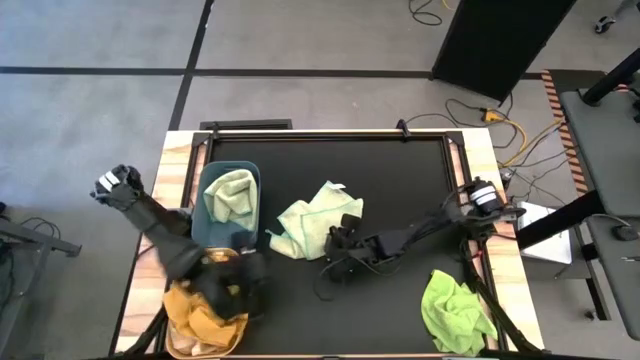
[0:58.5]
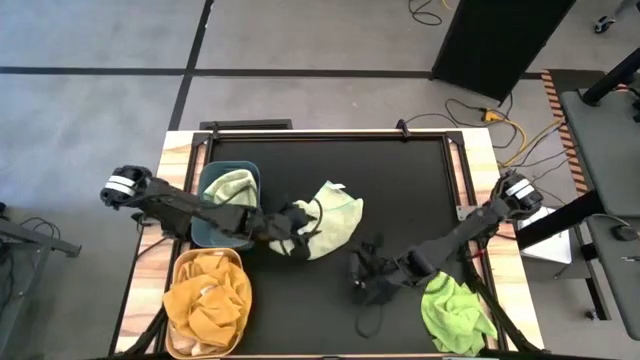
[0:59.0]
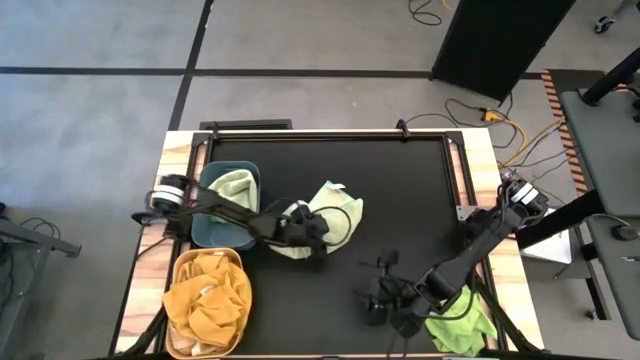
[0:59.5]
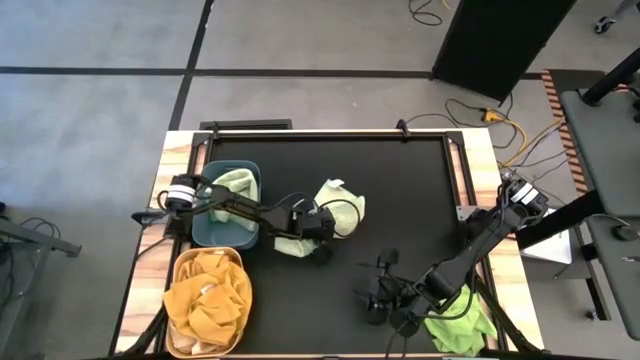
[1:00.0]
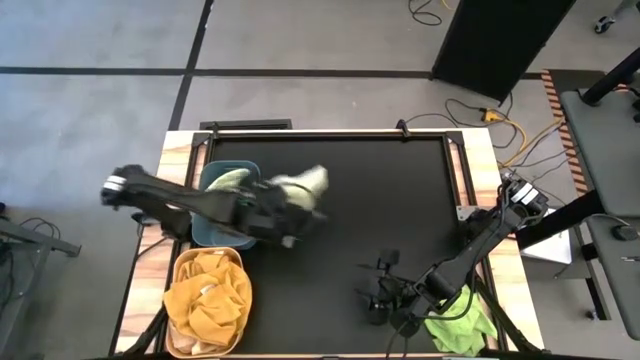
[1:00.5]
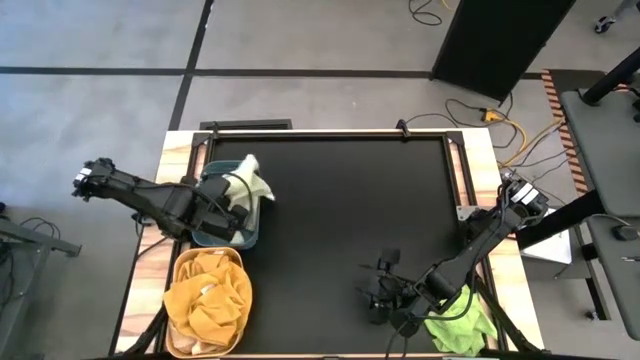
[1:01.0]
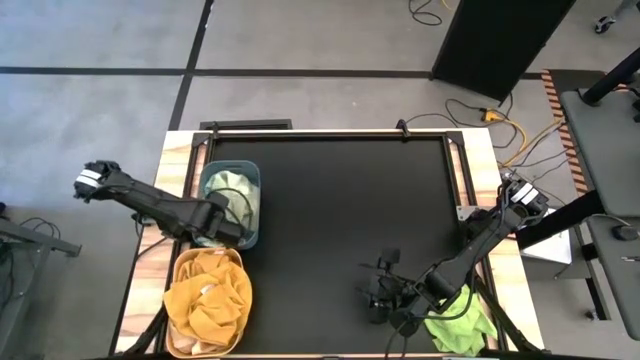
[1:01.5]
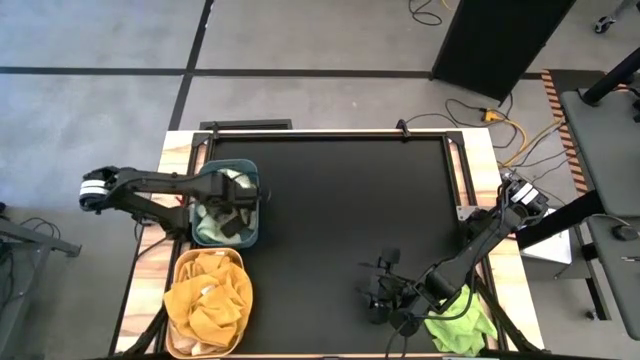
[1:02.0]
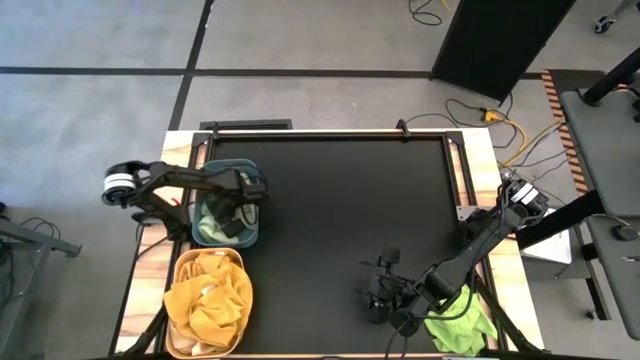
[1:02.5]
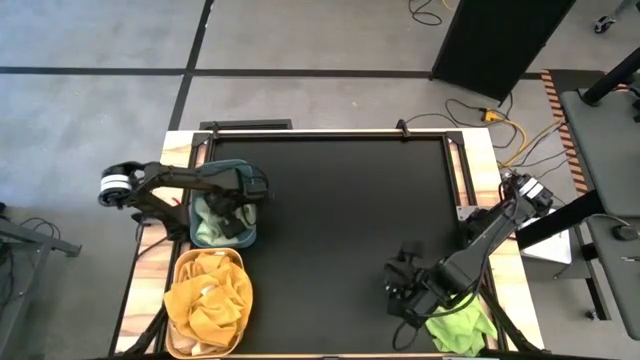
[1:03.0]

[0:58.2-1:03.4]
Task: Sort towels by color in basket
Put the light green microfiber towel into the blue bin

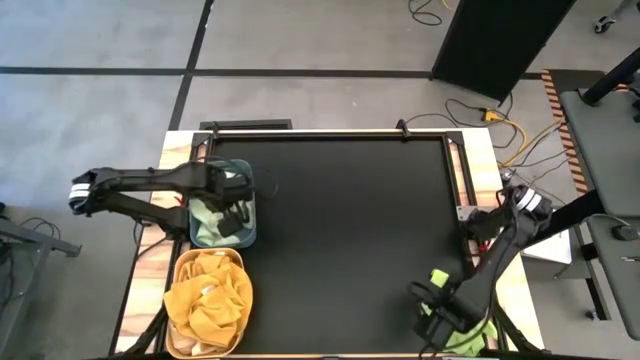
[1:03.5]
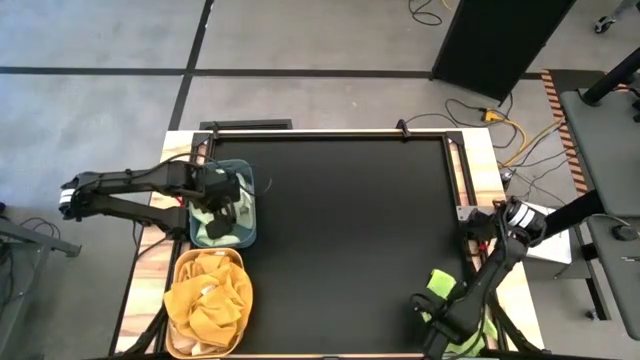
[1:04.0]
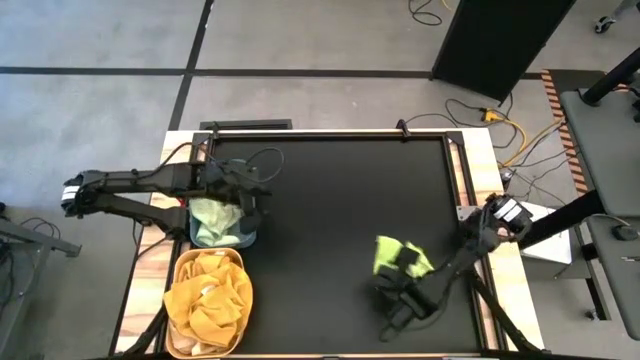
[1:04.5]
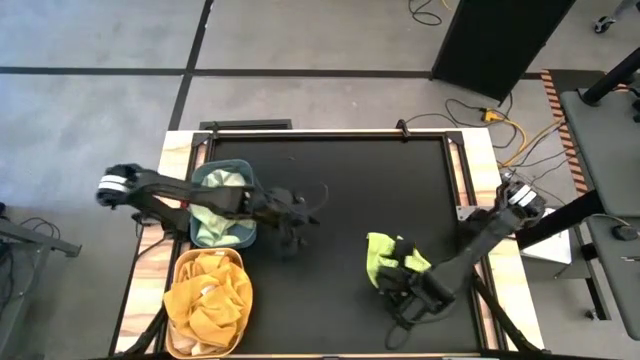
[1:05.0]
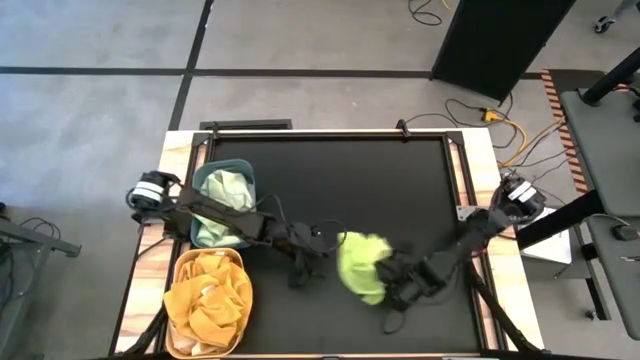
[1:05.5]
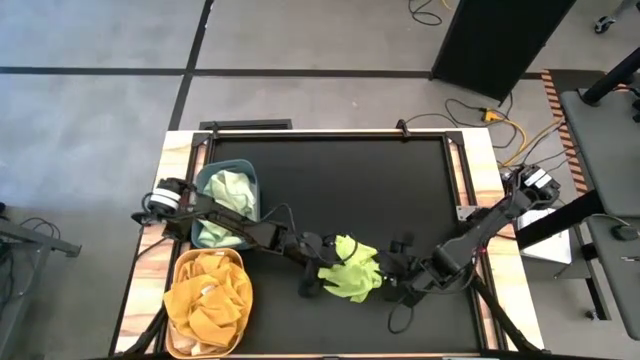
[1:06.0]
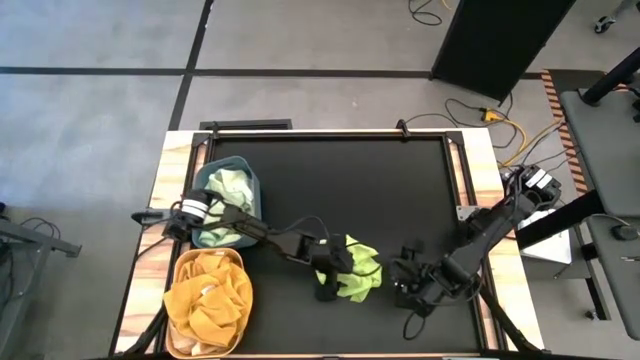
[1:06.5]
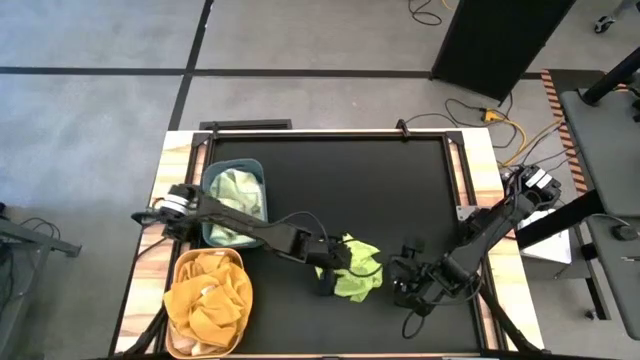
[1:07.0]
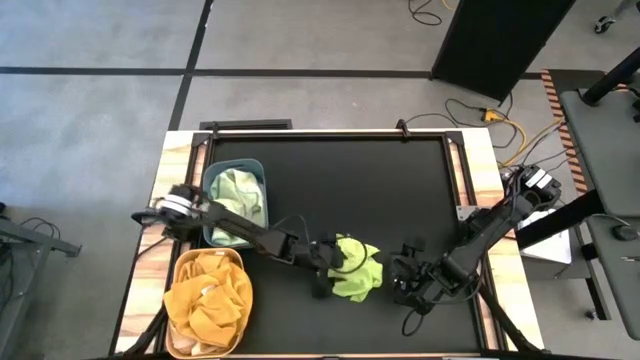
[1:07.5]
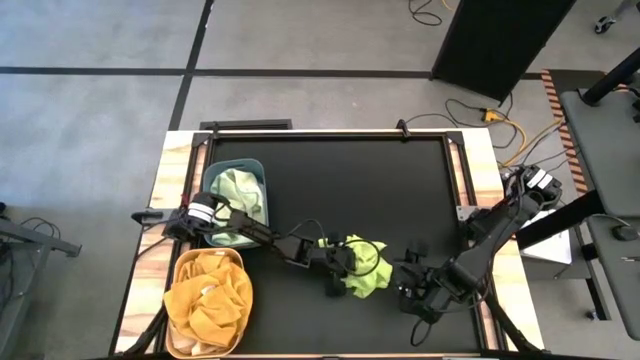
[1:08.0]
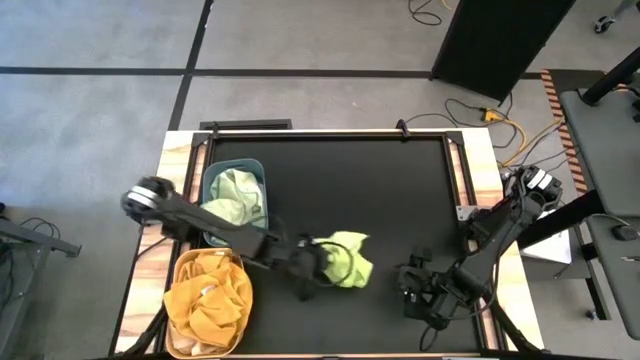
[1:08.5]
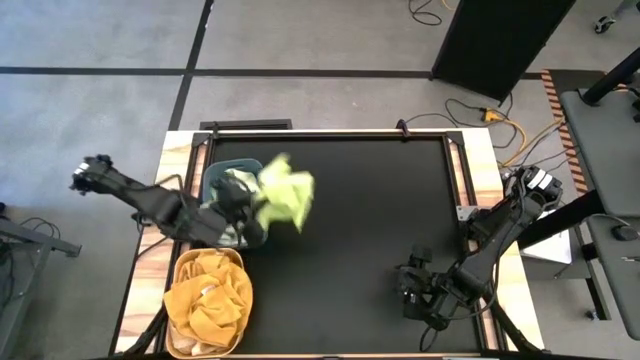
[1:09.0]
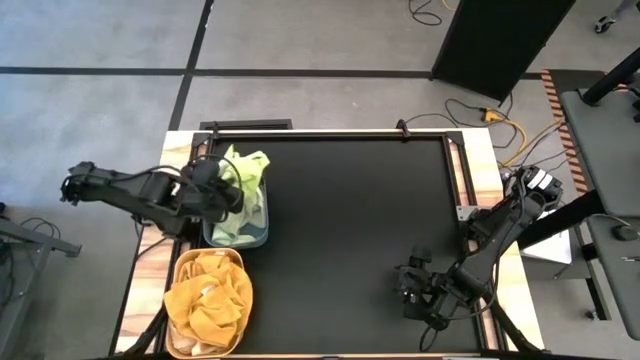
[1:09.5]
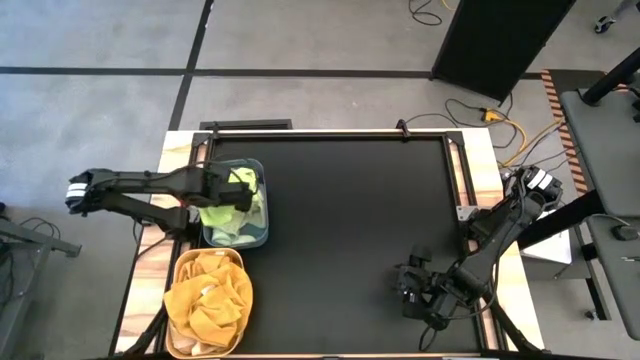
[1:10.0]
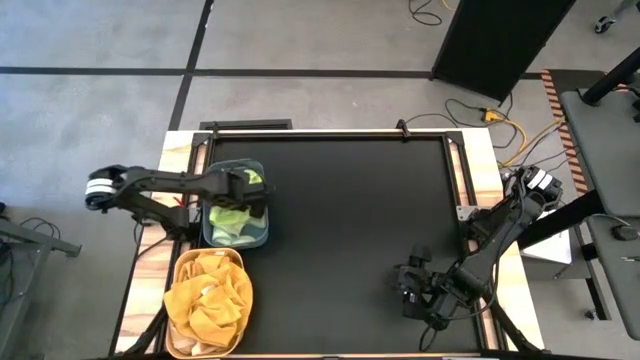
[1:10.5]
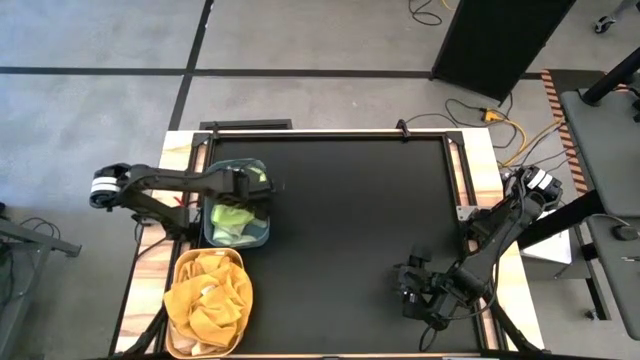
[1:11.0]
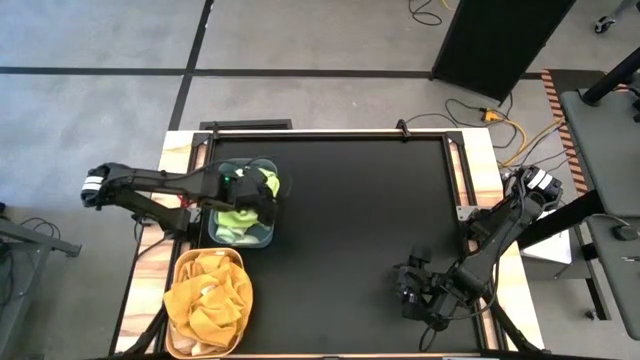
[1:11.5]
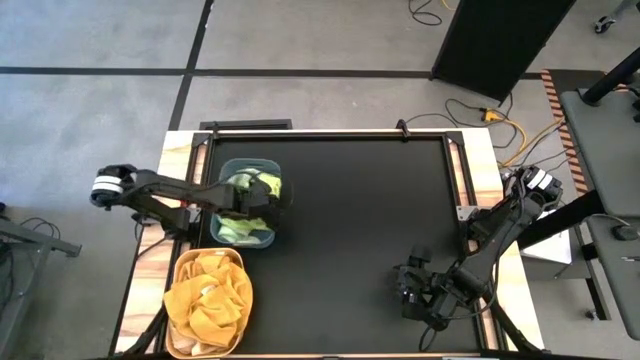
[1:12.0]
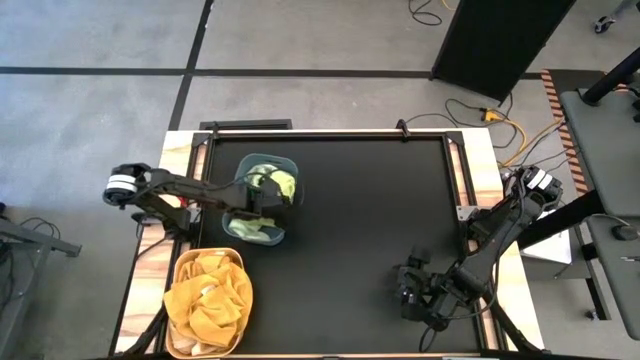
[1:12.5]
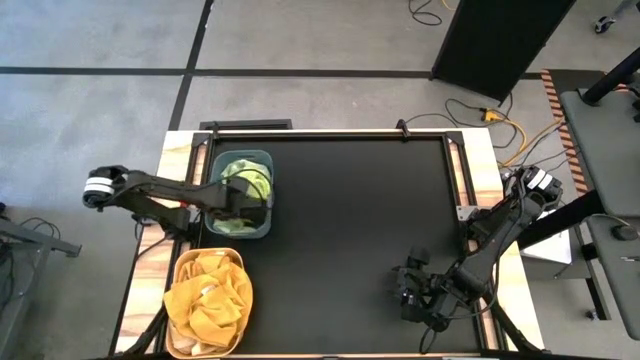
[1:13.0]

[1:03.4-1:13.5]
Put the green microfiber towel into the blue bin

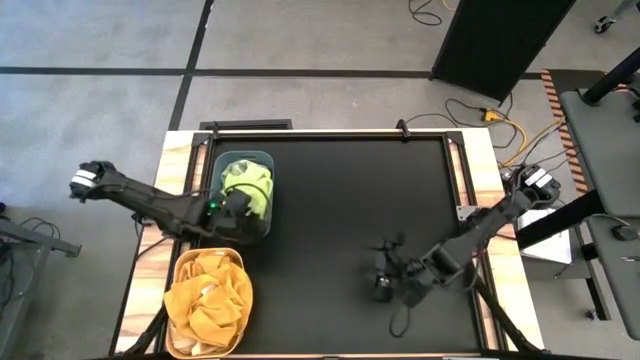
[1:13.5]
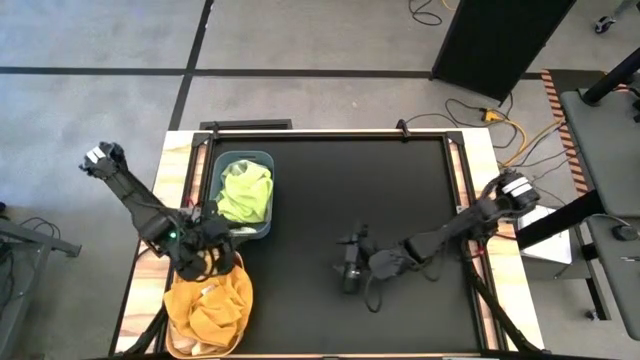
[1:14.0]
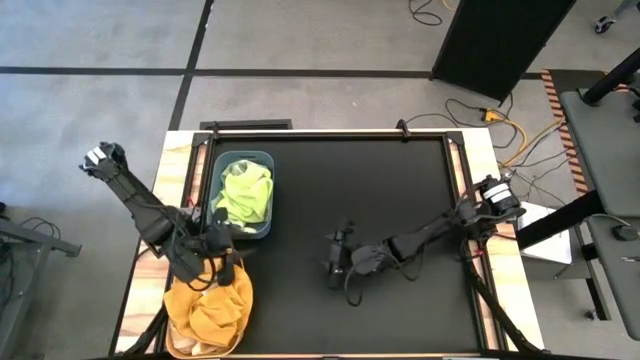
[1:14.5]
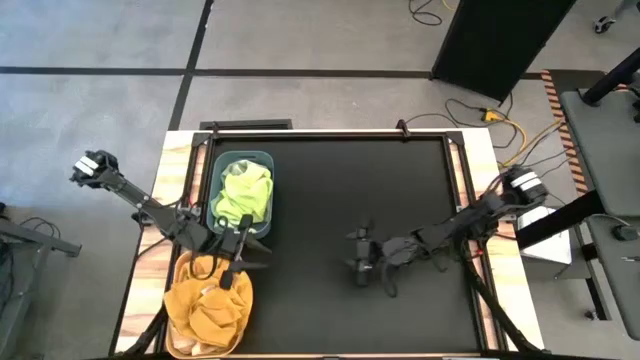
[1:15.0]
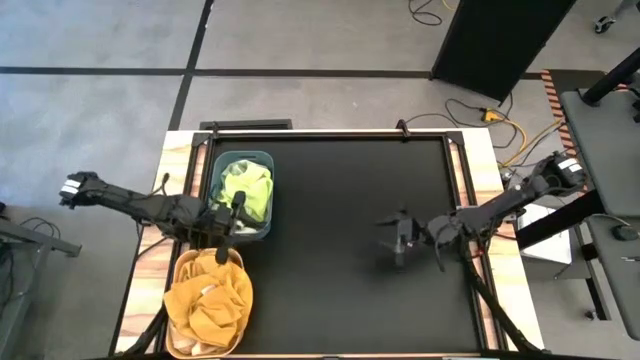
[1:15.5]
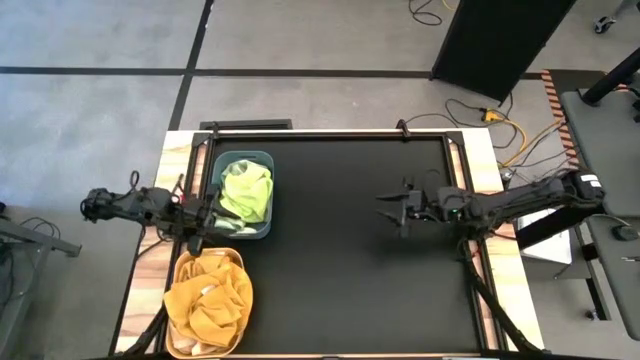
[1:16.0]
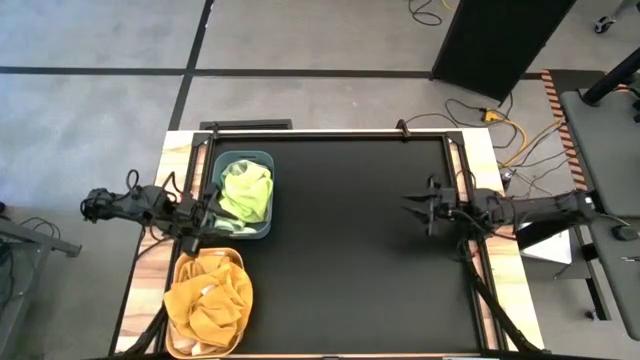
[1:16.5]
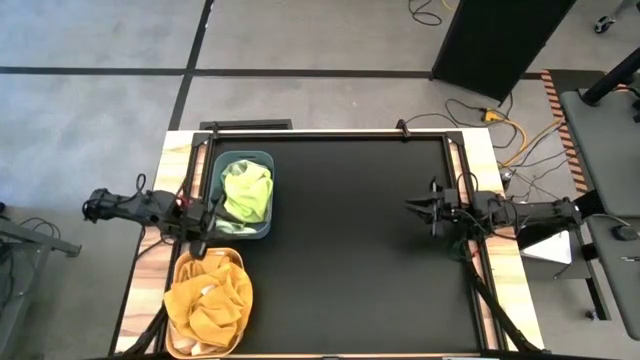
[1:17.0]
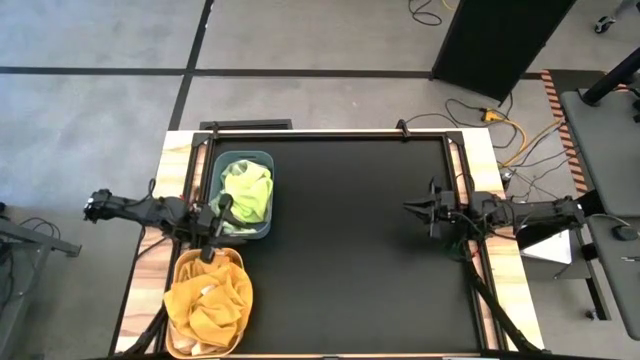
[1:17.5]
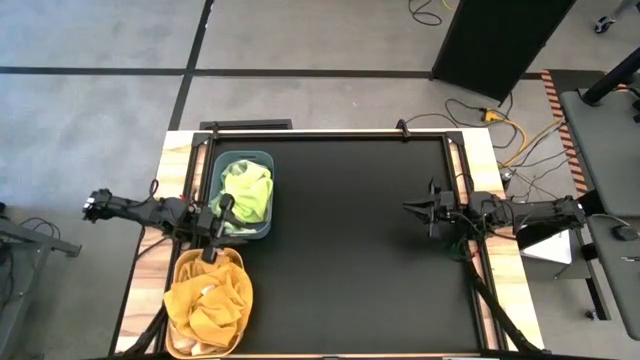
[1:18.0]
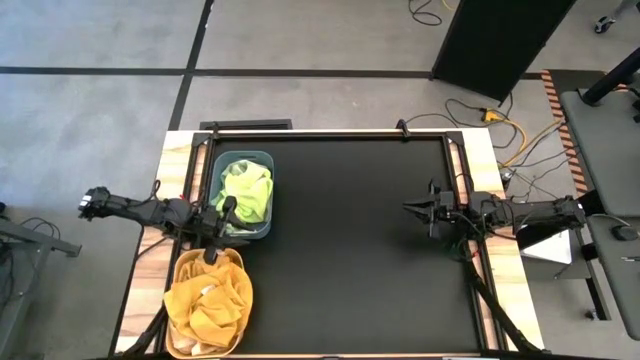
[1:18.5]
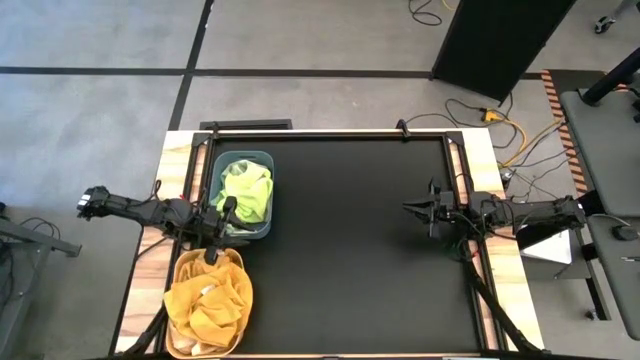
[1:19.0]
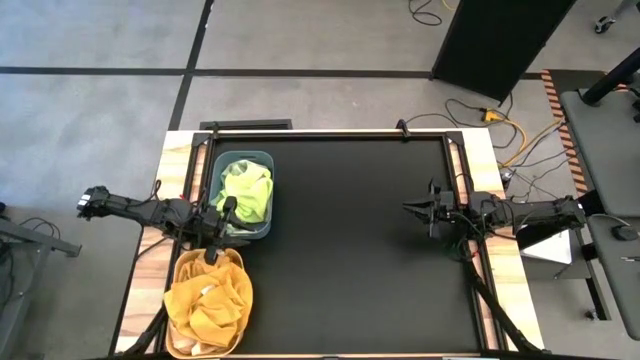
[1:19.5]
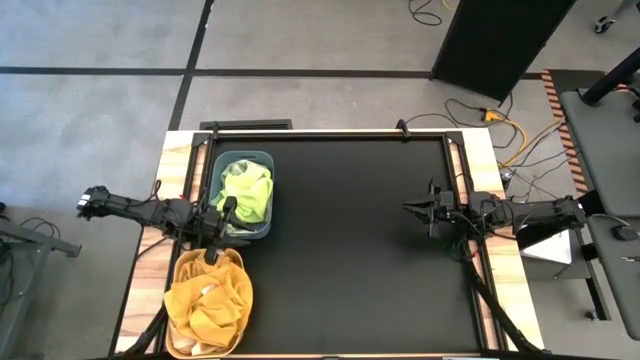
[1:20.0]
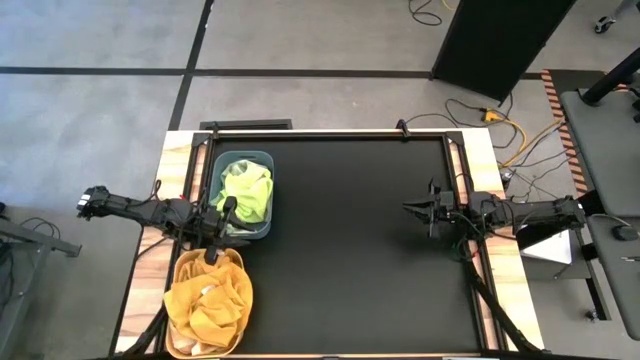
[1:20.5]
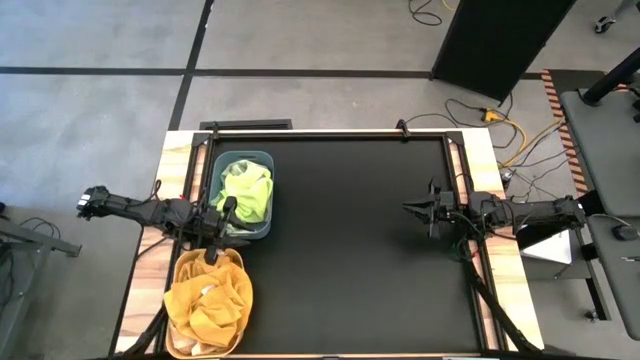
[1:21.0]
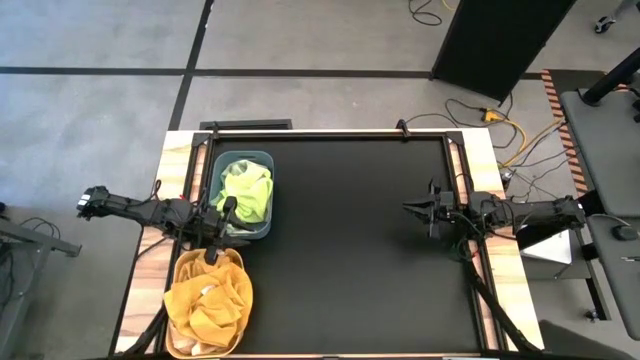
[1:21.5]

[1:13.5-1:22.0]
Return to Home Position
